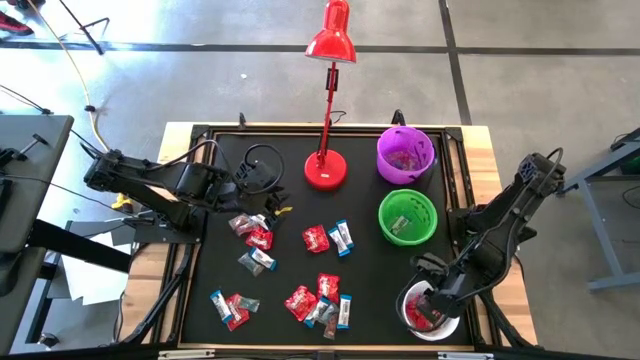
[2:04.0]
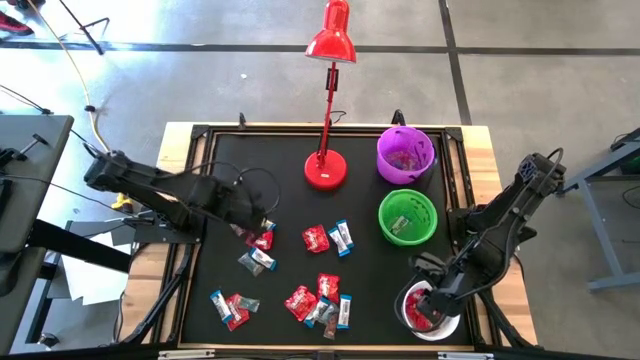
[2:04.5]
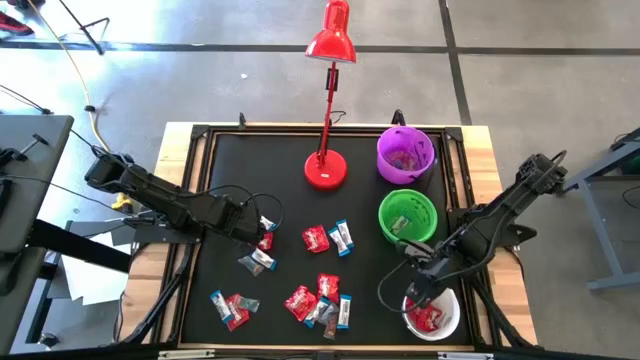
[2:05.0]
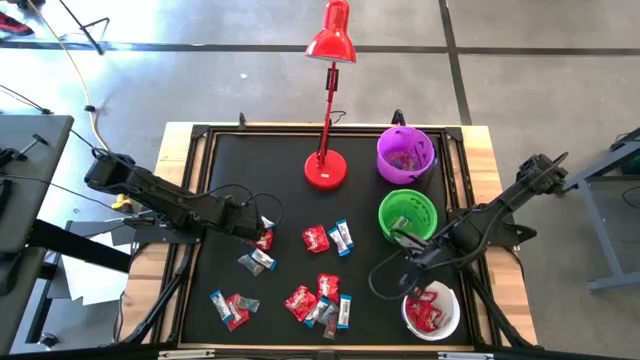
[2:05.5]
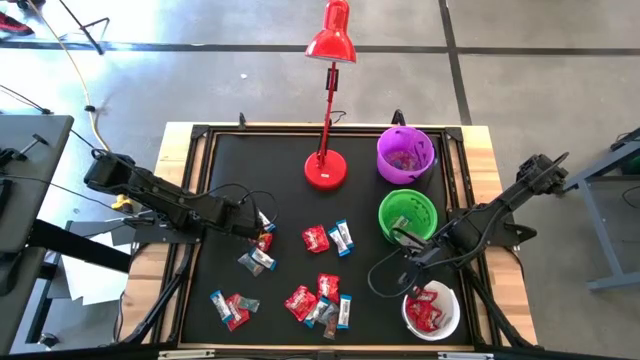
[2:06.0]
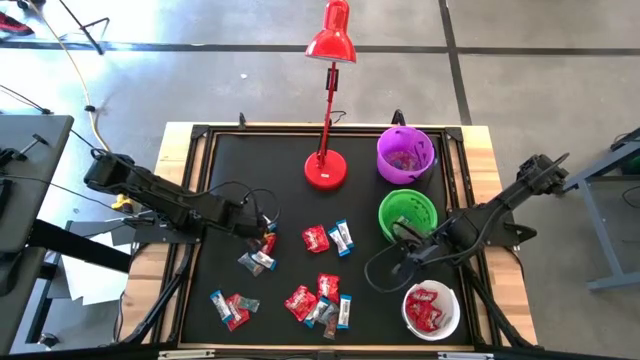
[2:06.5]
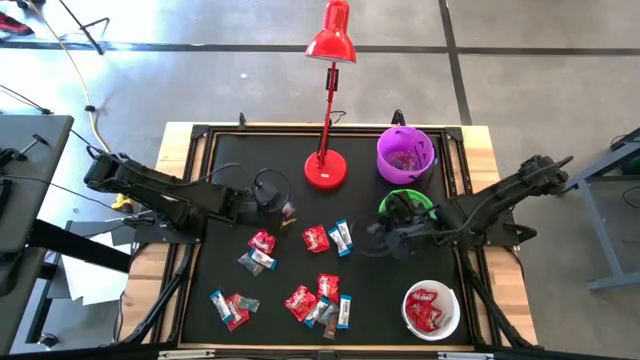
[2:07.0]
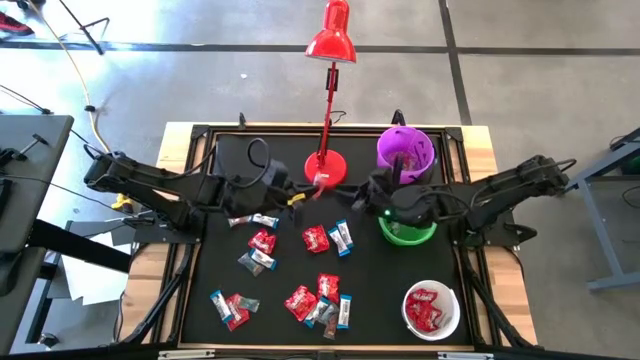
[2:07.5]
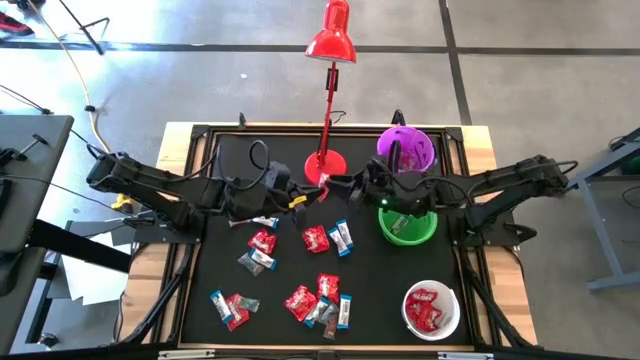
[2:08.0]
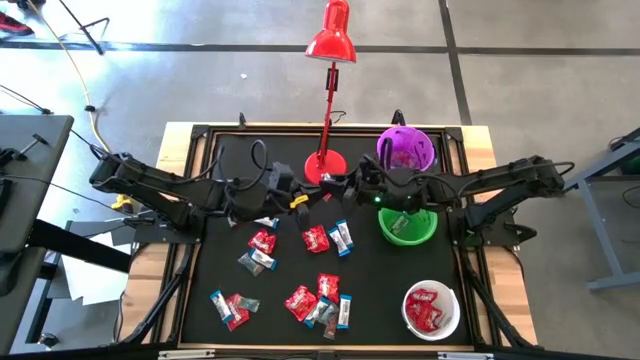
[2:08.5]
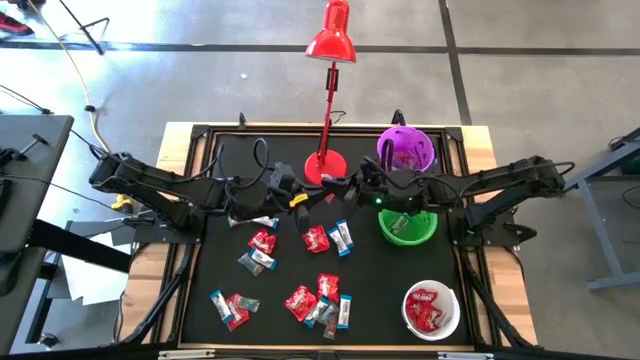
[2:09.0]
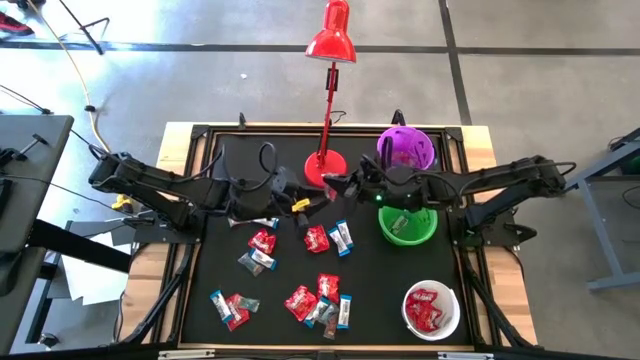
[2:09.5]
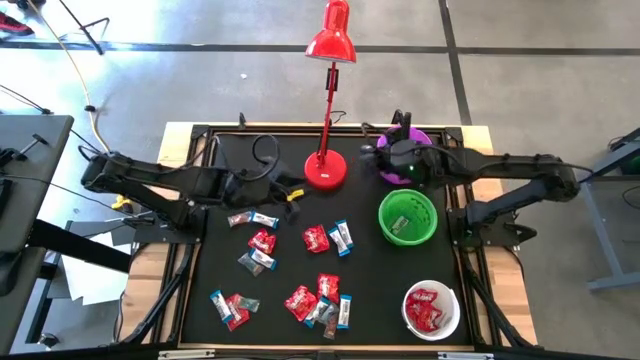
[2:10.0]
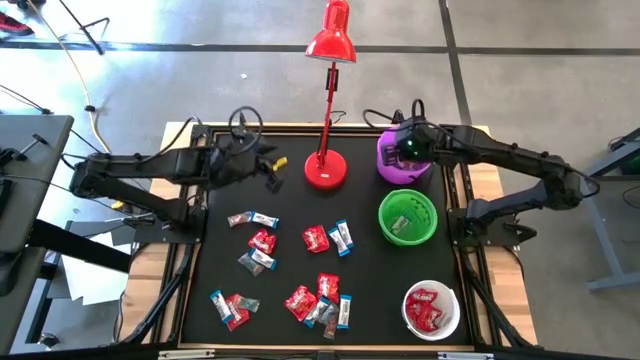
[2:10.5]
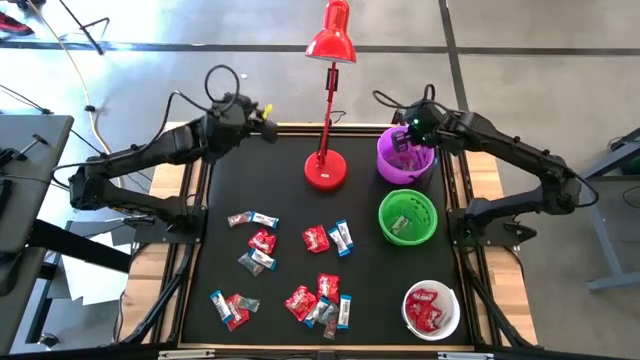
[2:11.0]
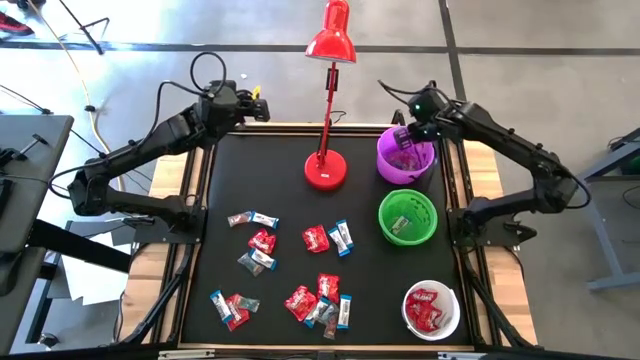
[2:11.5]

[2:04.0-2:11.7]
Task: Organize candy in baskets
Put the red gummy into the violet bucket

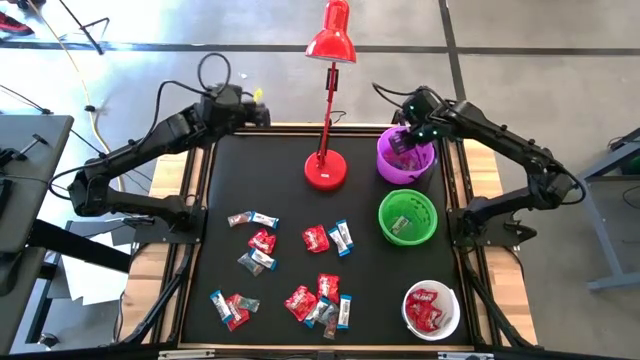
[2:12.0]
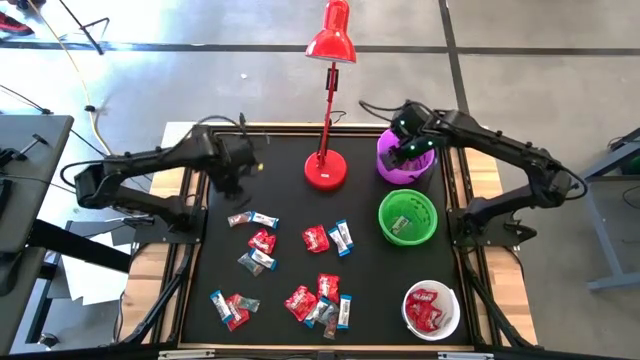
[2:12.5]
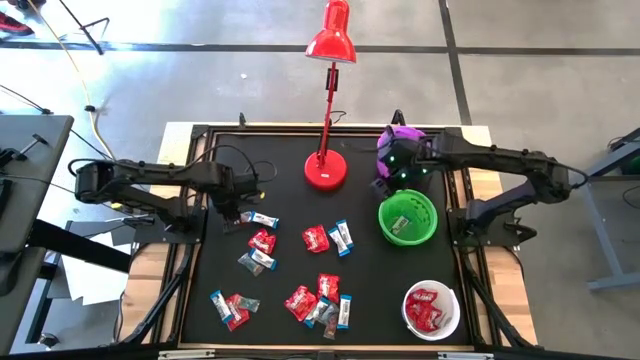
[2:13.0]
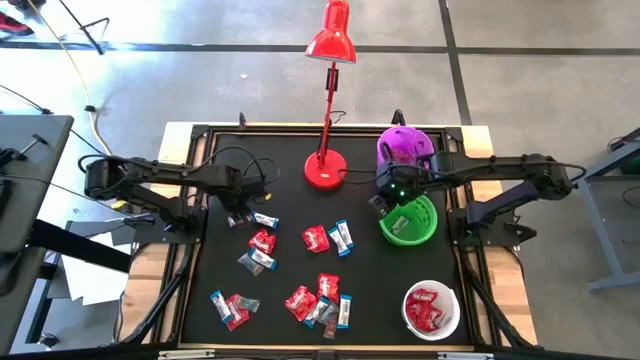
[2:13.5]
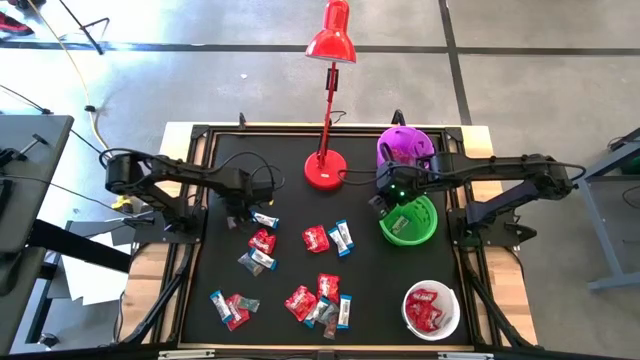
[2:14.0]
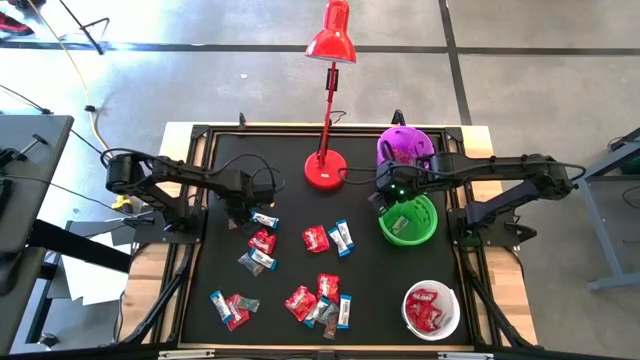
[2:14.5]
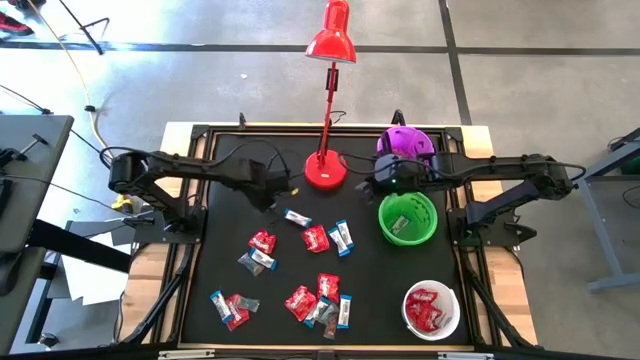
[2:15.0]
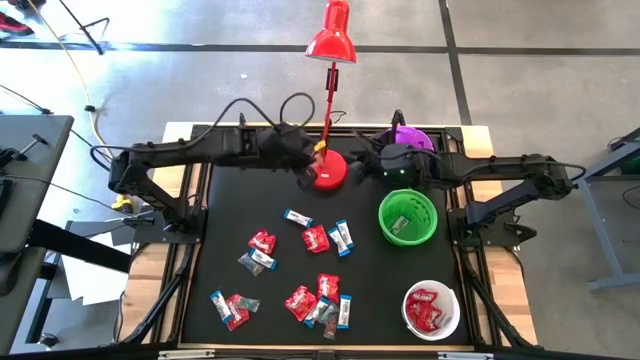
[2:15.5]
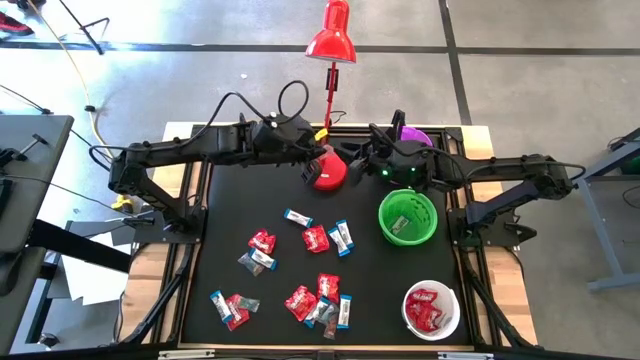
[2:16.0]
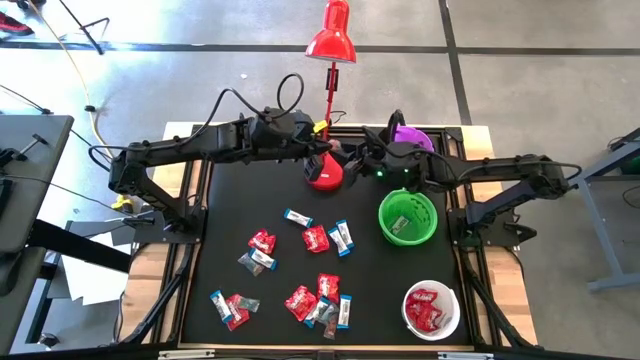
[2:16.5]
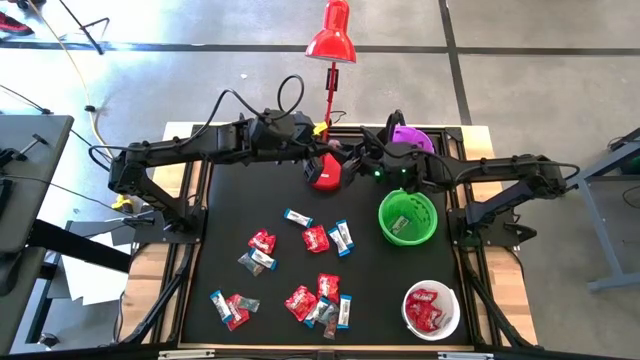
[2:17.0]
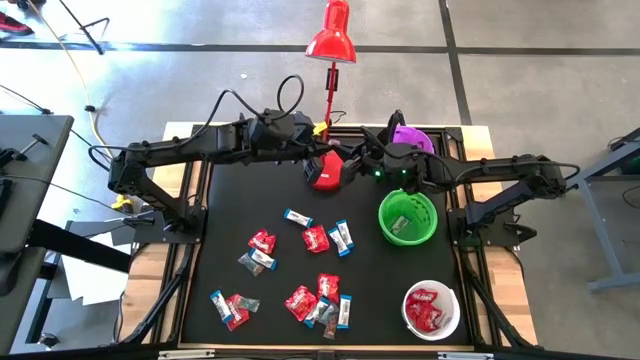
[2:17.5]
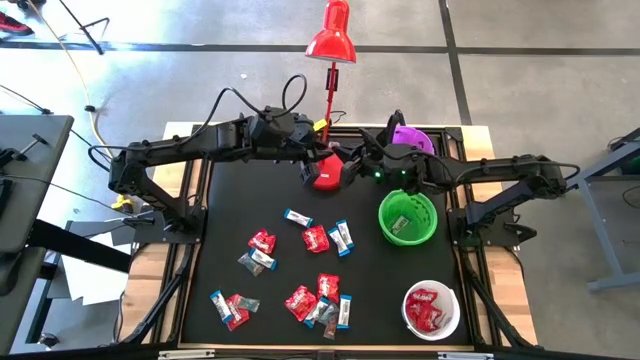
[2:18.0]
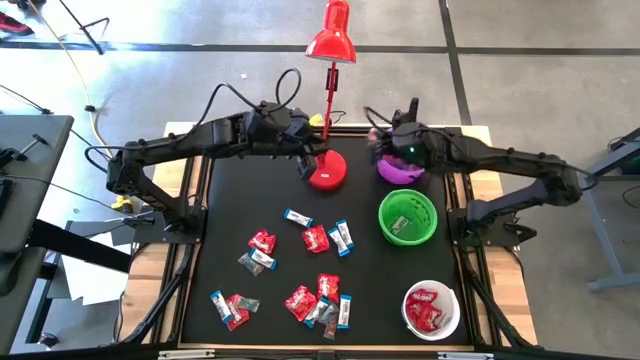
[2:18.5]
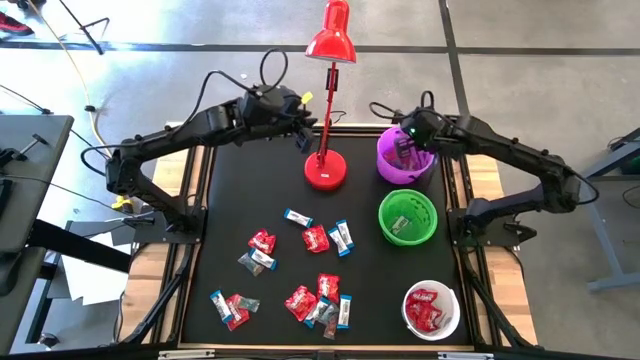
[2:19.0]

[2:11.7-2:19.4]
Put the orange gummy into the violet bucket

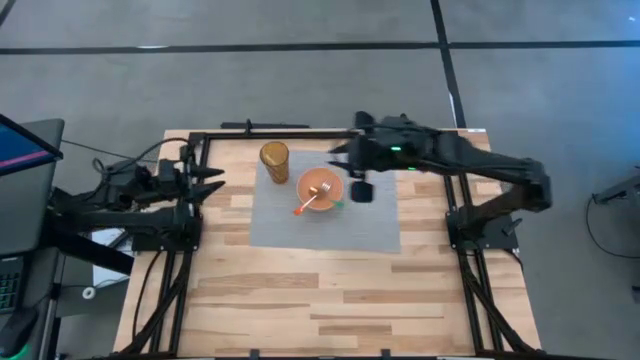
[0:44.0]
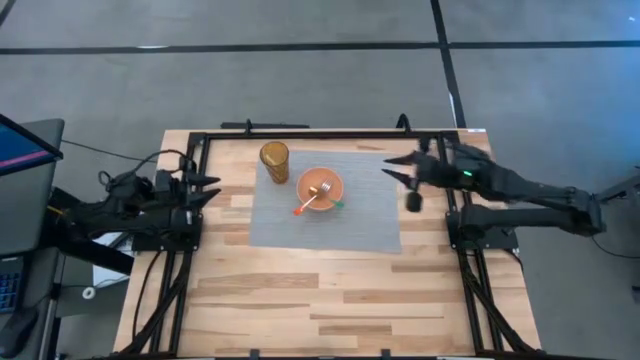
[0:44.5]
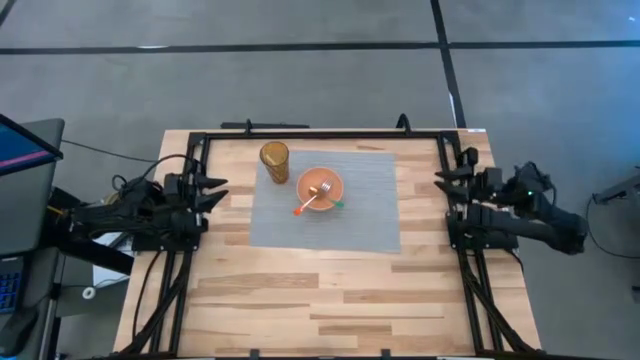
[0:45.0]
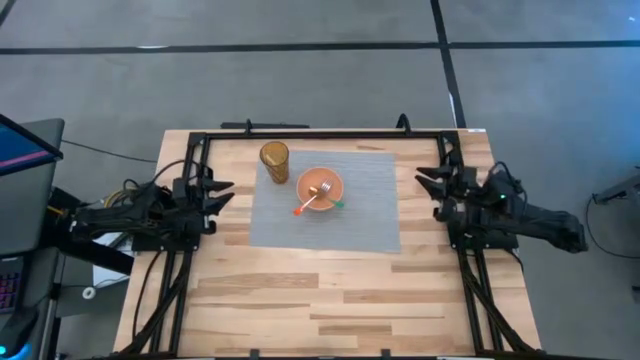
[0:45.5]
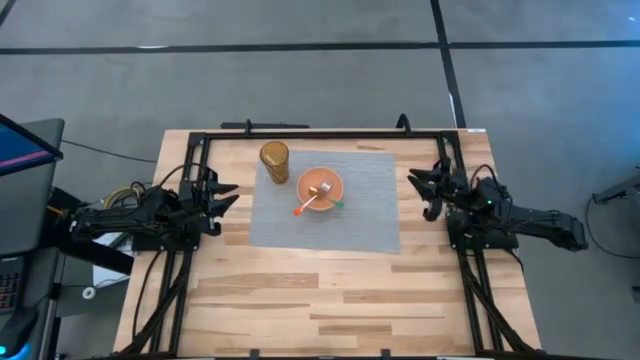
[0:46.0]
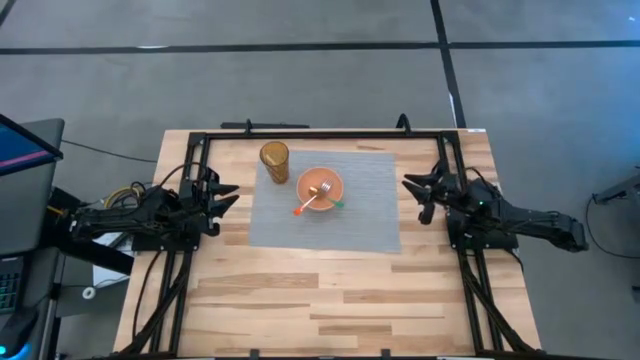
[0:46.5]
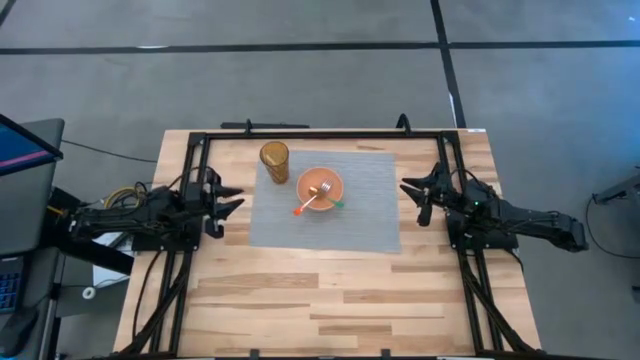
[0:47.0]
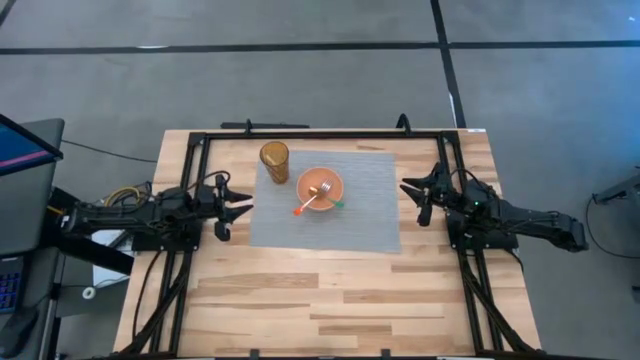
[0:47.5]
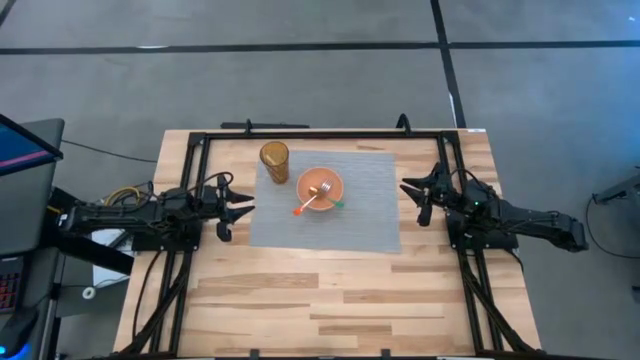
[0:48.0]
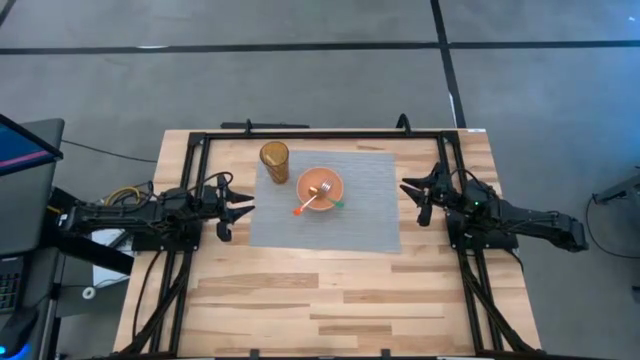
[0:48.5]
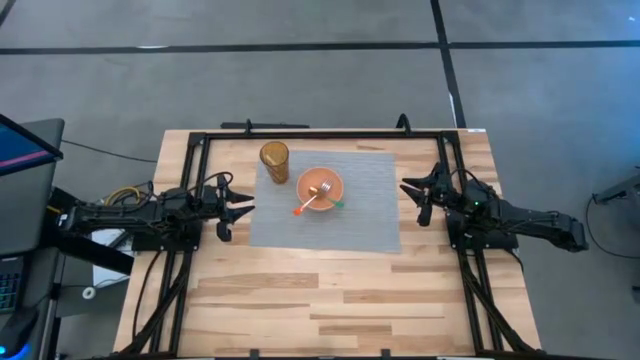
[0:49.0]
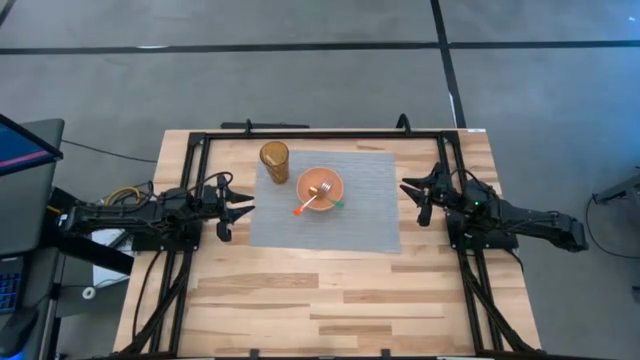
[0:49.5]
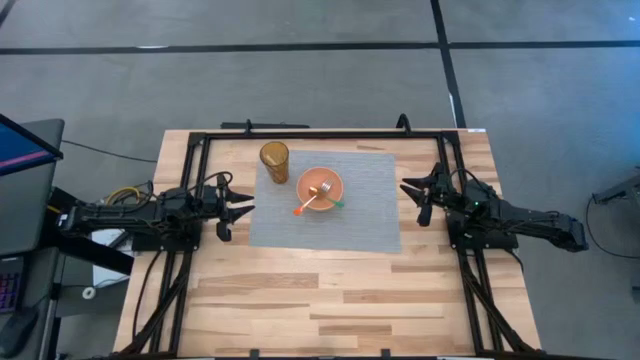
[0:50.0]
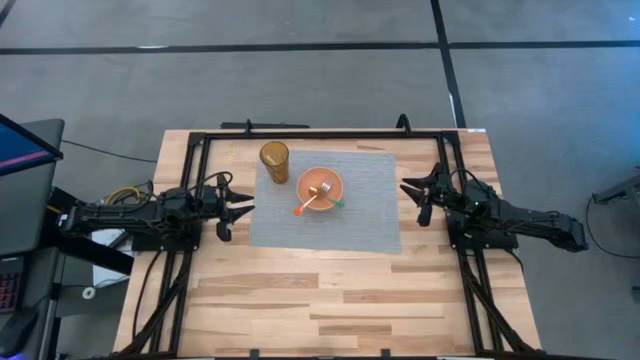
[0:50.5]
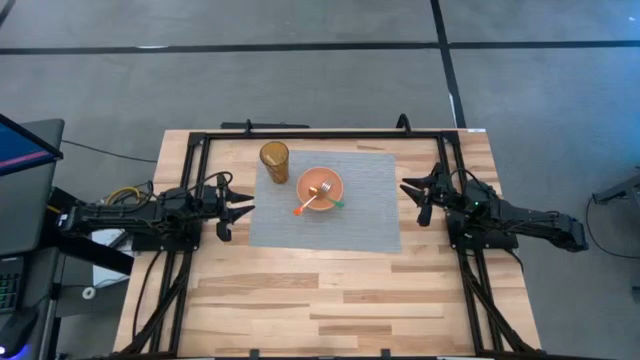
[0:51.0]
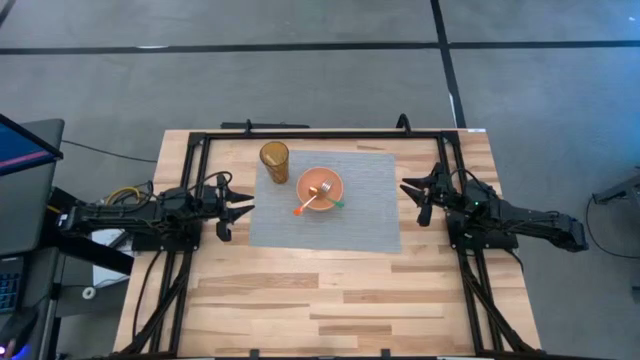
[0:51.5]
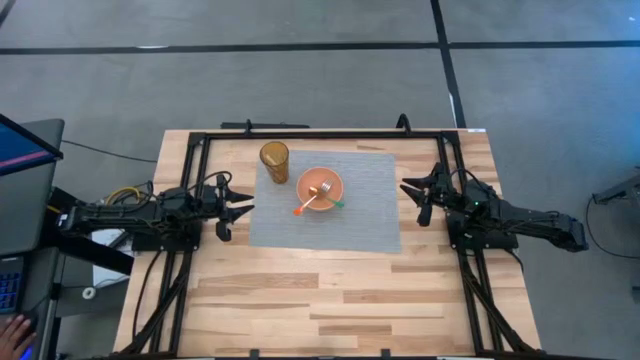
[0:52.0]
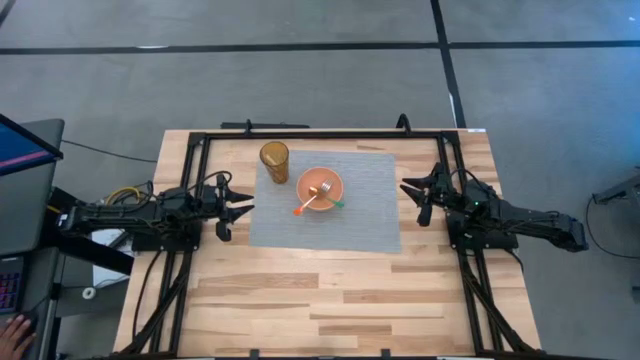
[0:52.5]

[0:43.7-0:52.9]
Task: Pick & Place Utensil
Return to Home Position
